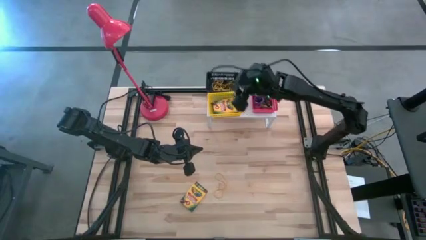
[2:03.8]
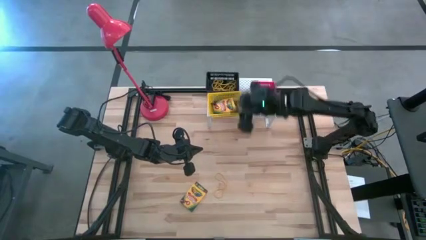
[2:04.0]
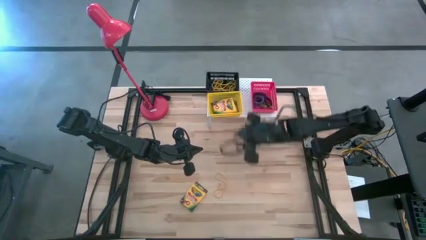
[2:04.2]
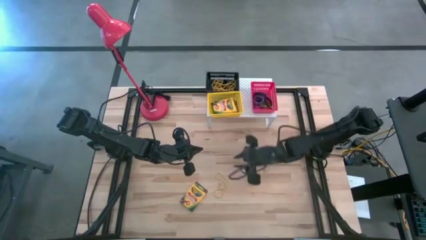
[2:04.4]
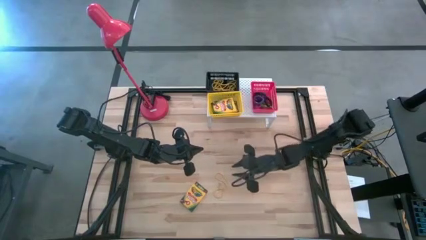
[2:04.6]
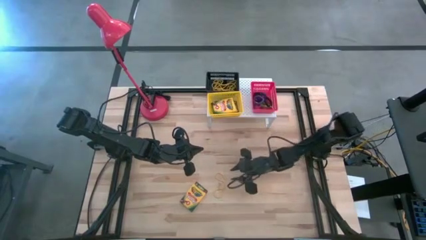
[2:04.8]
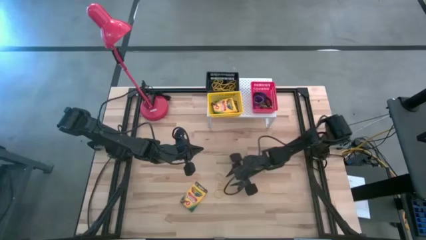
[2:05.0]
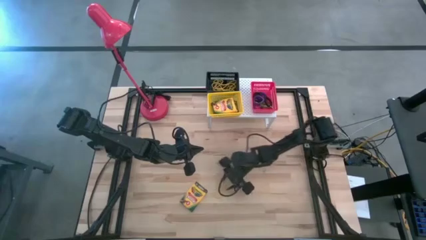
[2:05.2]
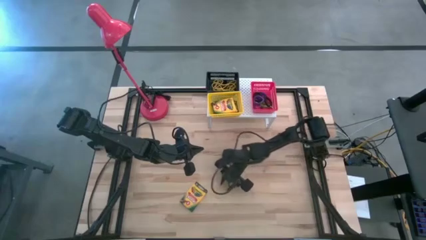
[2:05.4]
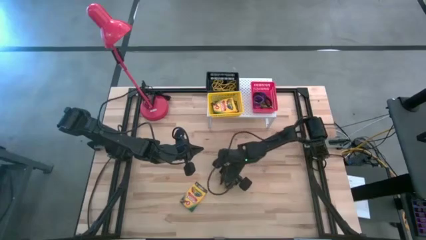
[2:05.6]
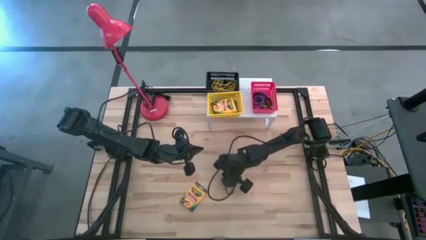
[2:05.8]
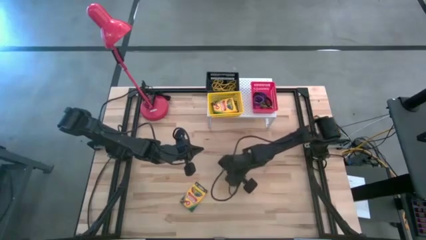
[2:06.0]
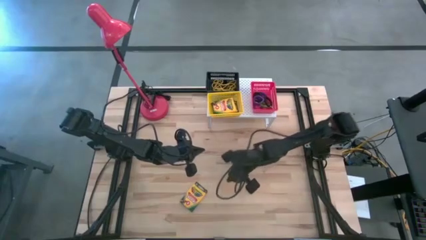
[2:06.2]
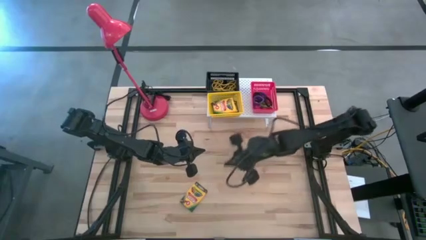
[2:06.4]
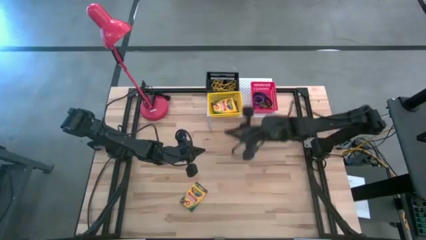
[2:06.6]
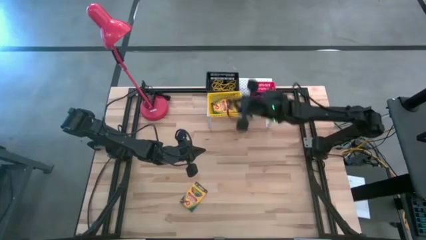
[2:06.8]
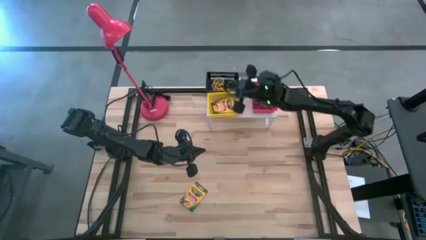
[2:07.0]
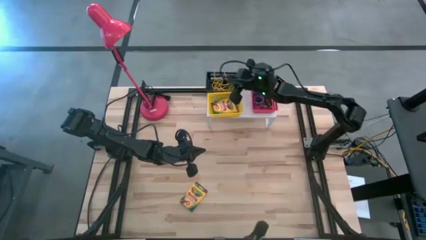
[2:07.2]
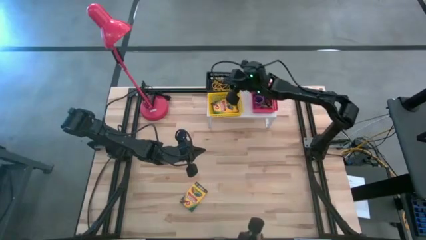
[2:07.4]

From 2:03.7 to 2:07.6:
Task: Pick & Place Office Desk Supplies
Put the yellow rubber band into the black bin on the shelf

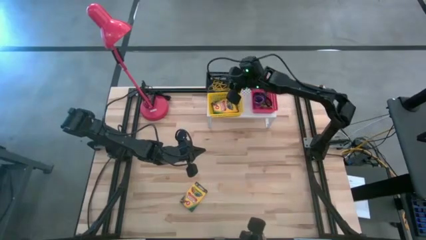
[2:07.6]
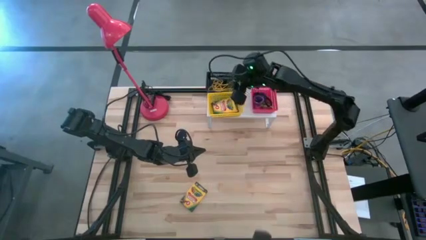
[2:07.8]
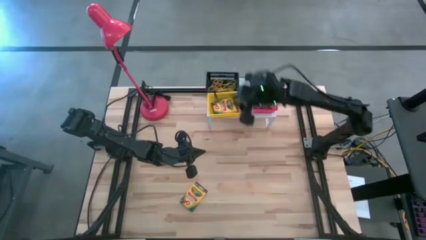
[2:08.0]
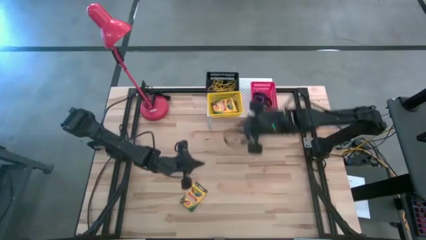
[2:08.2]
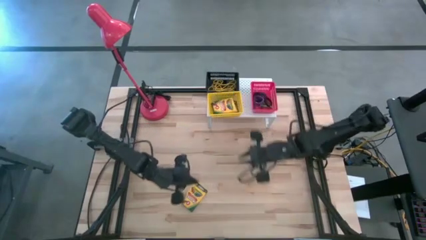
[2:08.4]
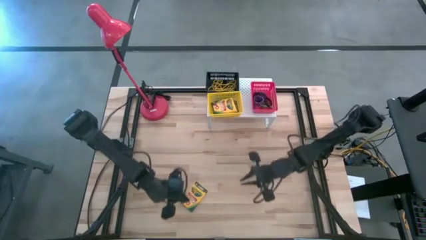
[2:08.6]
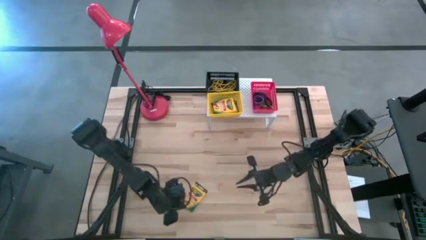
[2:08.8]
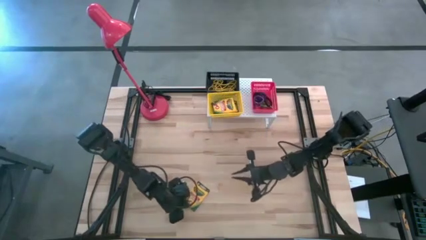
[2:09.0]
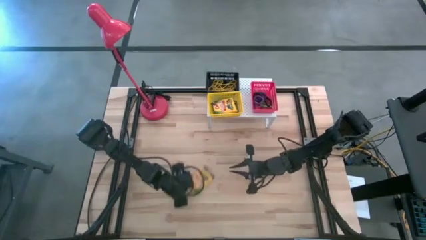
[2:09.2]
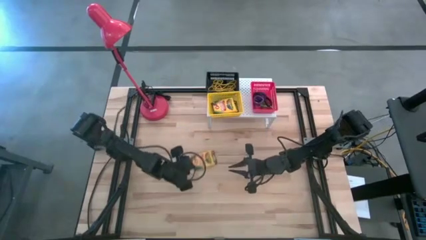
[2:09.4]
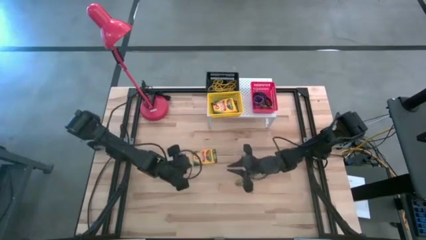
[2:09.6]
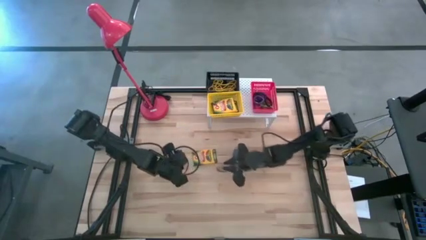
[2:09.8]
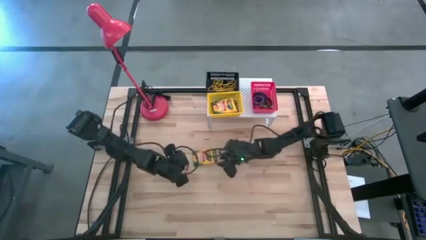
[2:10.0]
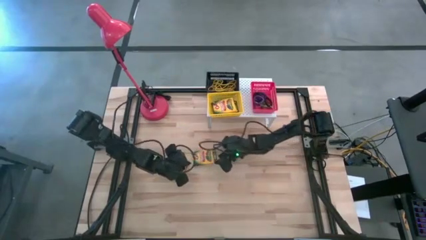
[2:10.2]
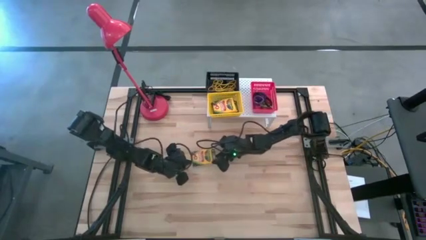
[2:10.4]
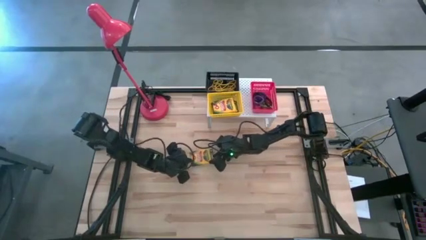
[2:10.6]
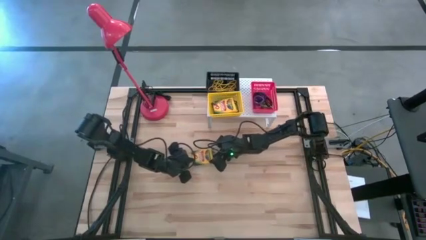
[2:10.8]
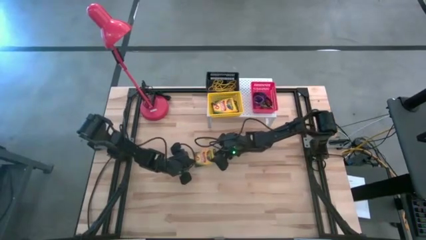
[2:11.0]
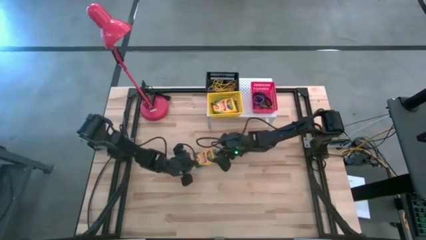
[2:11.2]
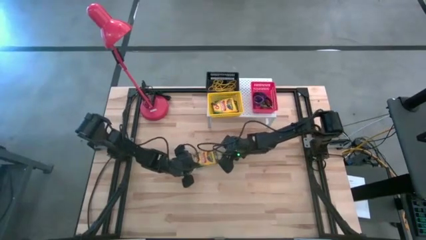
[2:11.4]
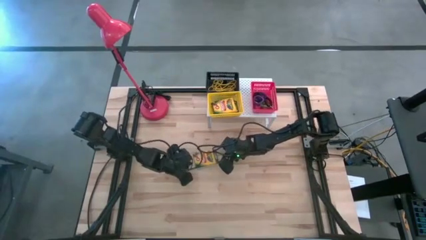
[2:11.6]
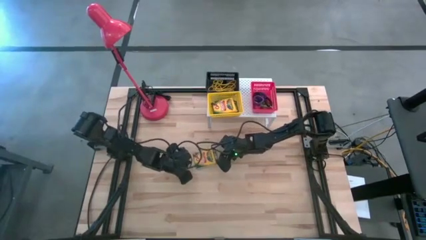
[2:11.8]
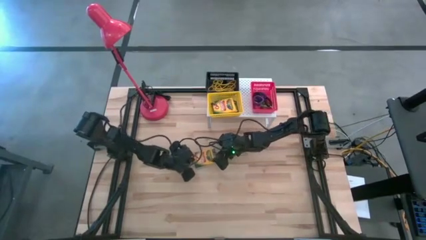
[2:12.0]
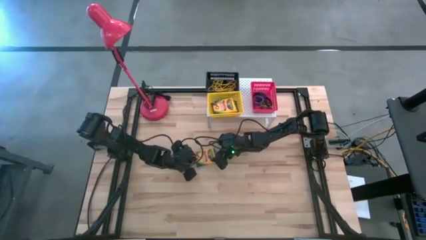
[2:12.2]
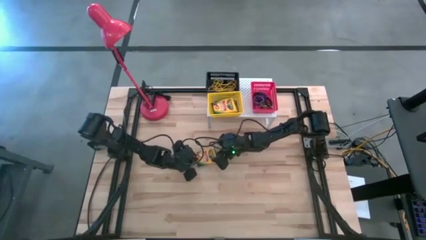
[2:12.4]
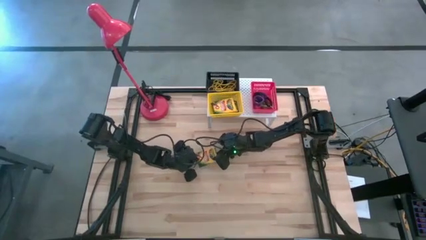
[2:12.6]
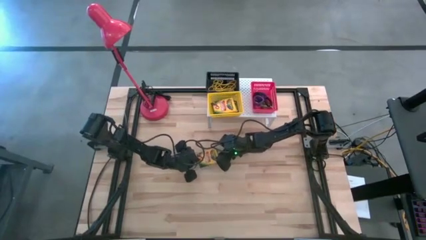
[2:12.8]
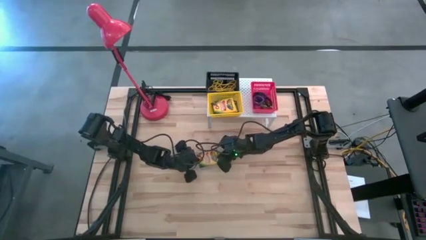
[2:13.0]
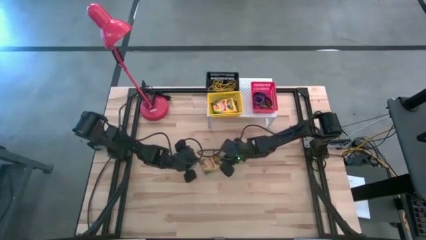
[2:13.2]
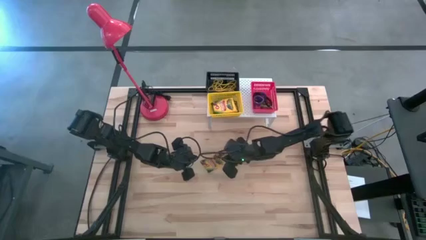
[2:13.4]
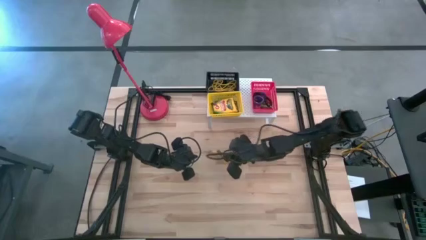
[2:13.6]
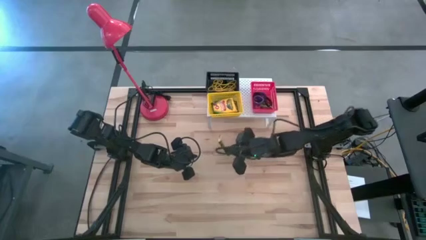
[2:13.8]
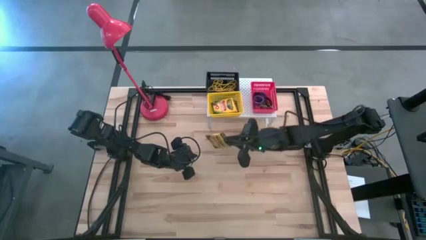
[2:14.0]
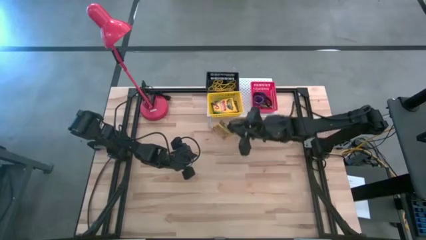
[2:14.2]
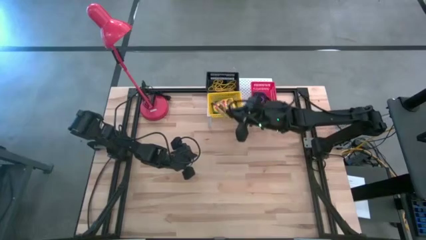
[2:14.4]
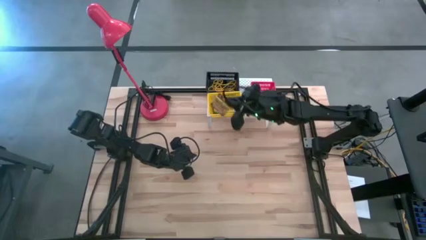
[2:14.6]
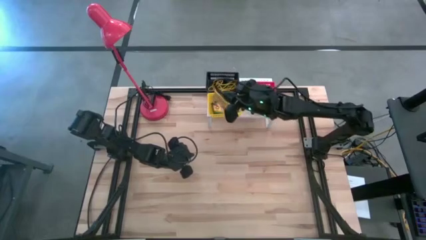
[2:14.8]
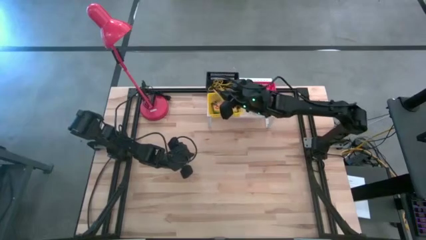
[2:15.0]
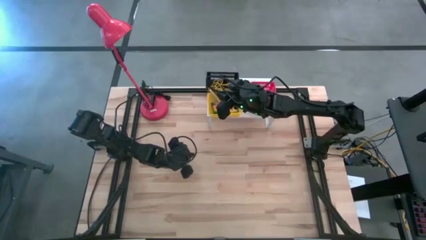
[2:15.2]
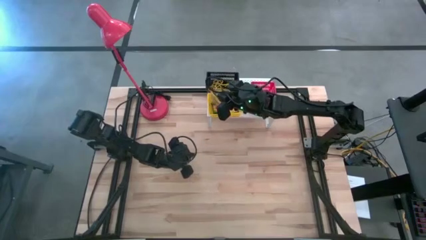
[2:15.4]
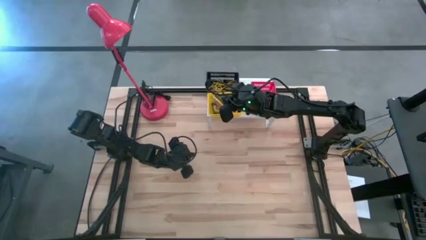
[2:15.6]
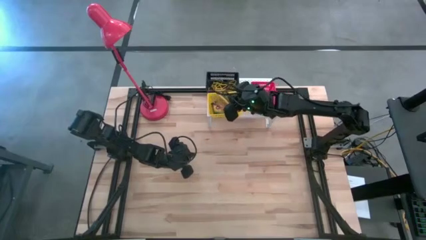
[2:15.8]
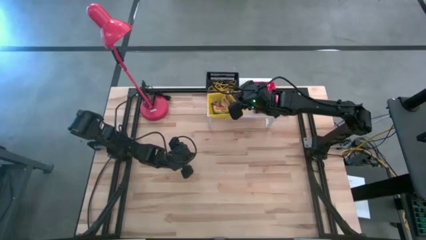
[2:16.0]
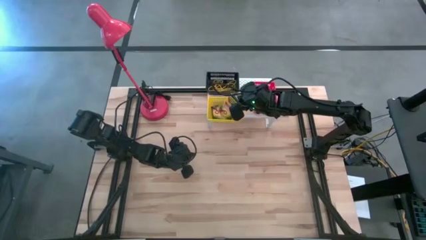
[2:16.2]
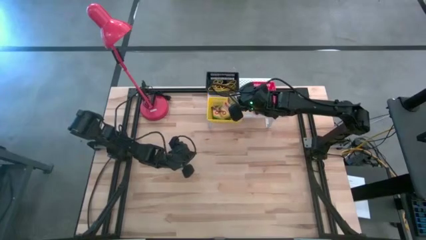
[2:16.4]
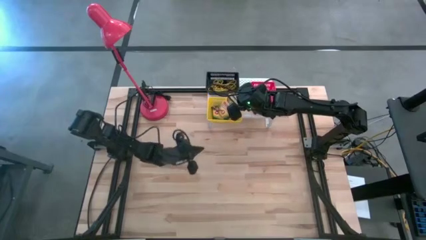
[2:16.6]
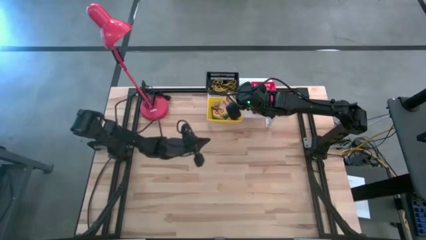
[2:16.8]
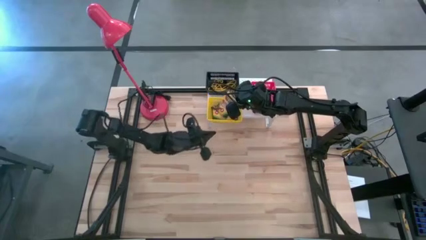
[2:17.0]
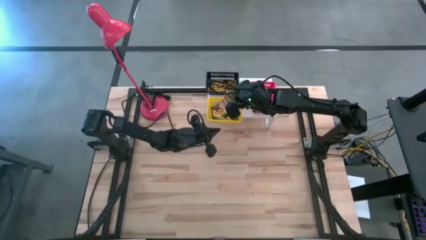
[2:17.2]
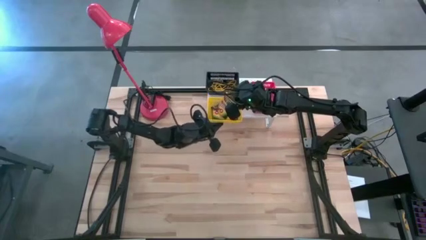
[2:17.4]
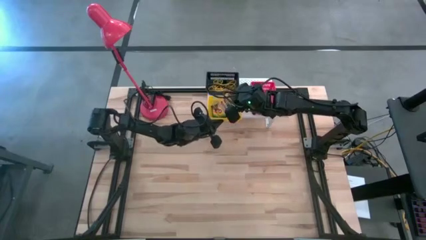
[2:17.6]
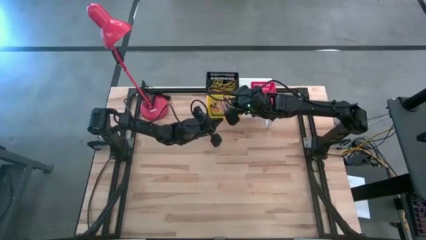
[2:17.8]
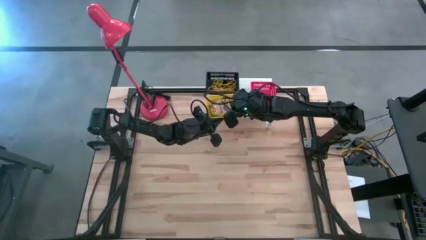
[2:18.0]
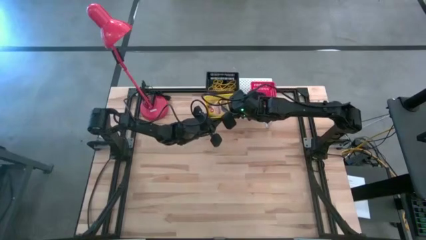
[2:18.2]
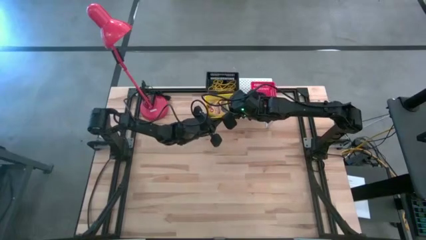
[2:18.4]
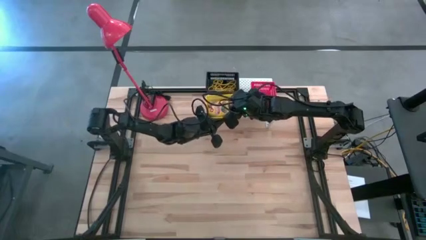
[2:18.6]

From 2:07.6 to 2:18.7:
Put the yellow crayon box into the yellow bin on the shelf

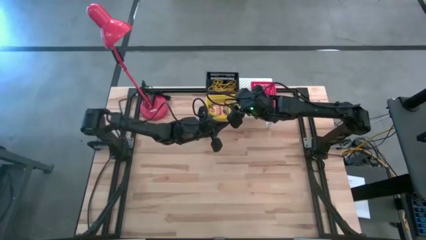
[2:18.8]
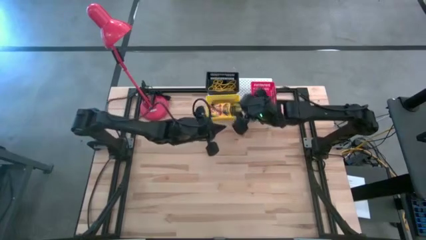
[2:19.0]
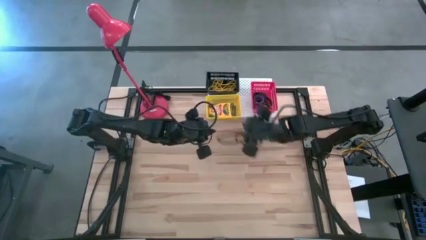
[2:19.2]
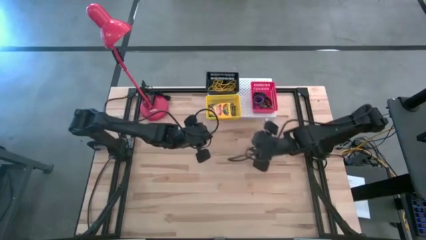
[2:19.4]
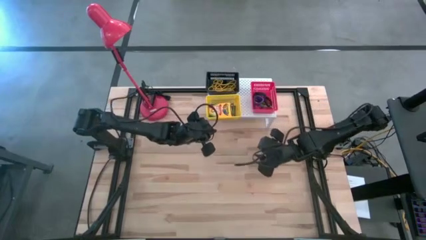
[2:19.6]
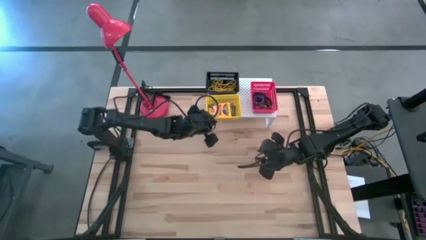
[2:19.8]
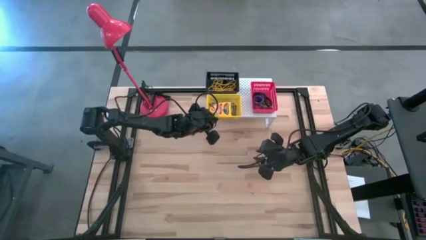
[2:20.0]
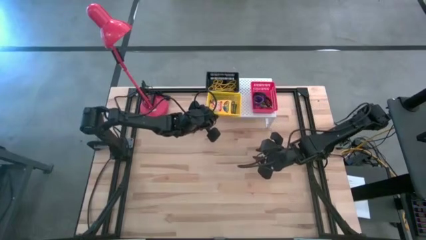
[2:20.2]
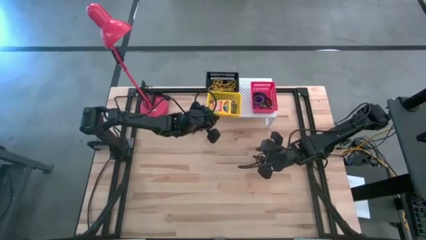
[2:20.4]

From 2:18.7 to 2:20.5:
Adjust the yellow bin on the shelf
